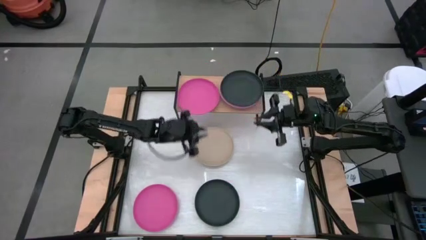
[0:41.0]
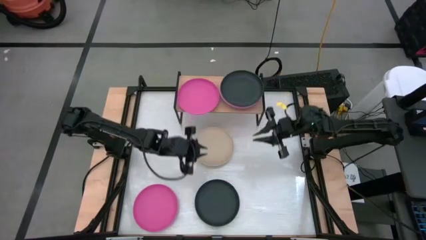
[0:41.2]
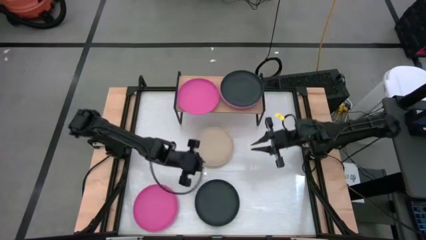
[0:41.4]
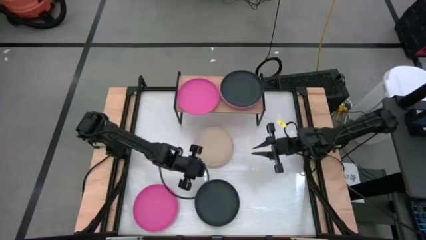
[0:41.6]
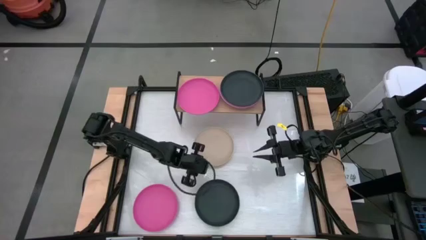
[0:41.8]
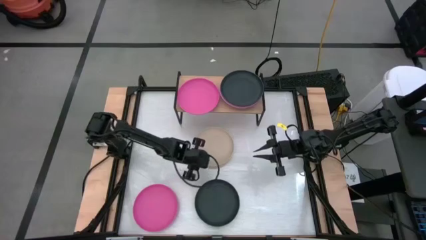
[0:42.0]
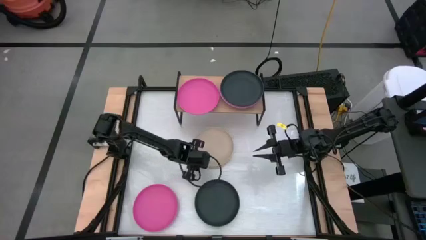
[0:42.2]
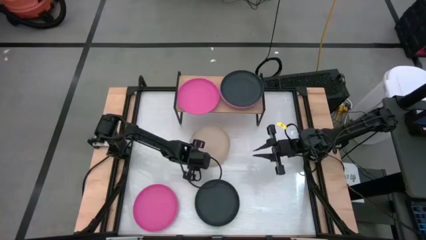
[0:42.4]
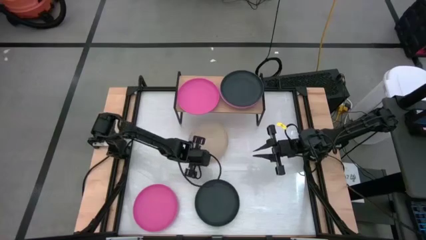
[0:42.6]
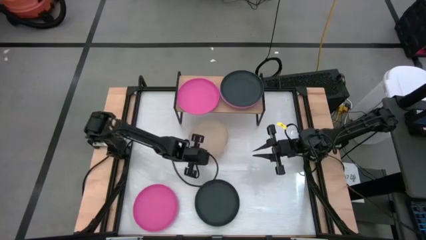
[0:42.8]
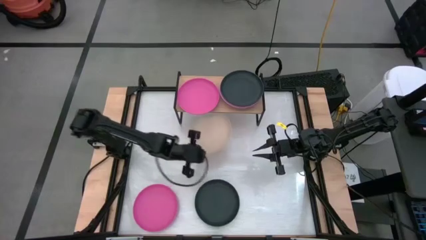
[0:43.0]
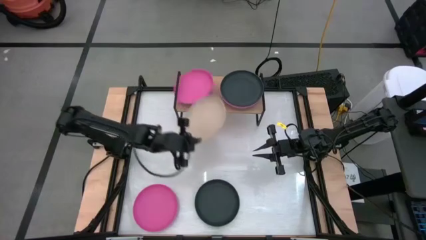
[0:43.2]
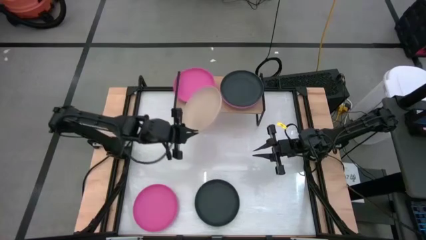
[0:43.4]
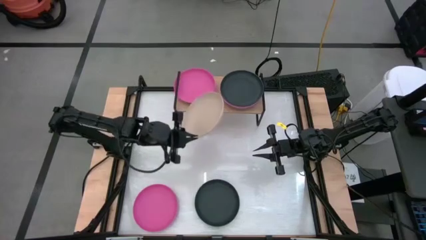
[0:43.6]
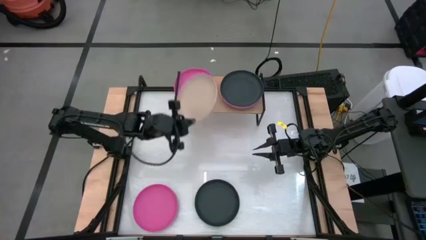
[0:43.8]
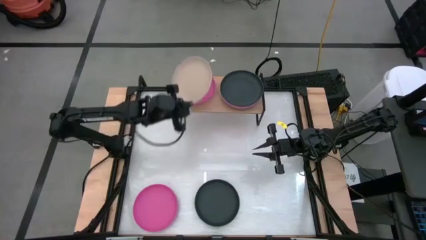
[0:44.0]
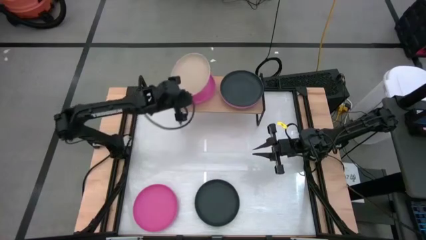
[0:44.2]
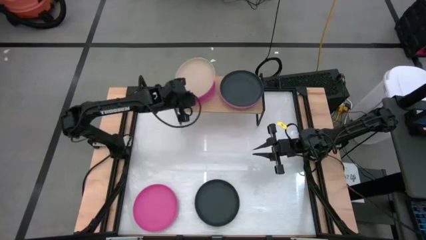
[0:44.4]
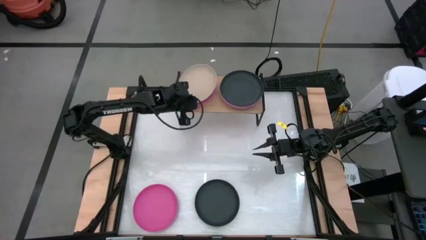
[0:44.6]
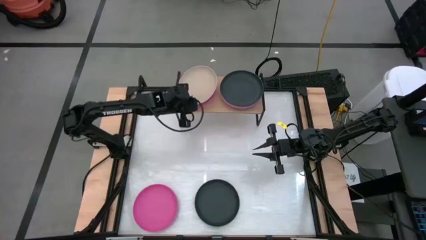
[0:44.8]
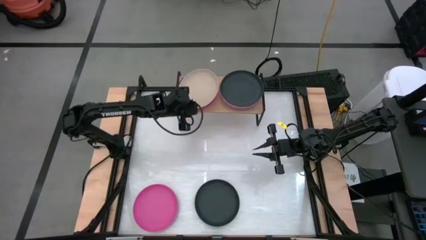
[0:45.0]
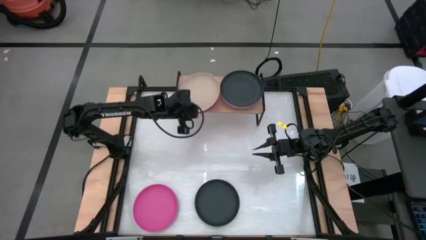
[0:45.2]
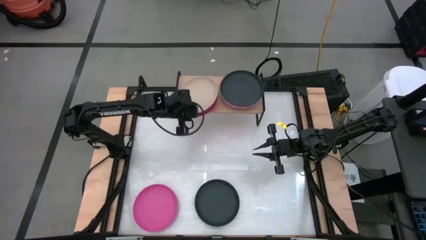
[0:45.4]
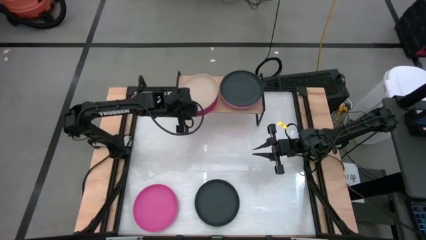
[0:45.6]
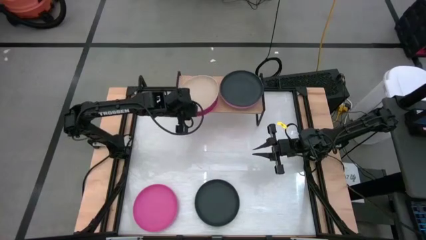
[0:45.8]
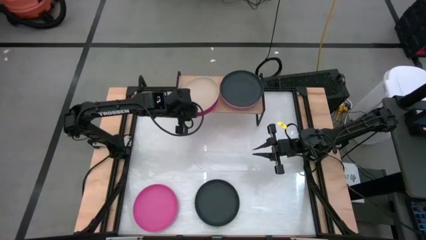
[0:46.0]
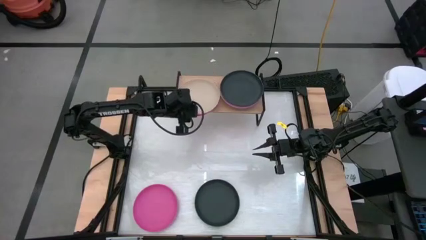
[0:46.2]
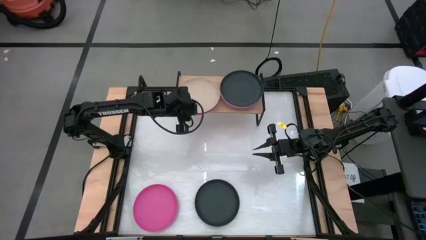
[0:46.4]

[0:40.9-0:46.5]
Task: Place and stack plates onto a shelf
Stack the brown plate on top of the pink plate on the shelf

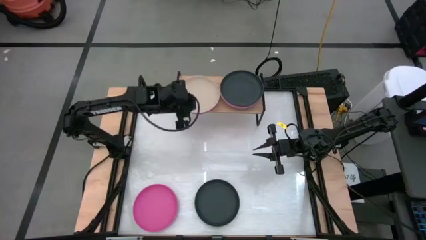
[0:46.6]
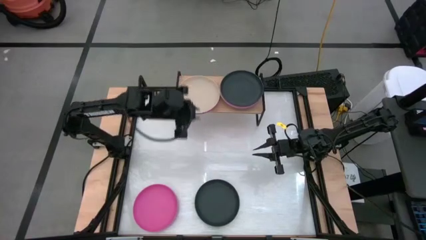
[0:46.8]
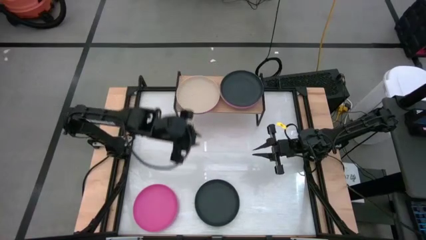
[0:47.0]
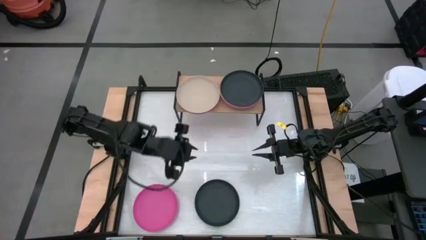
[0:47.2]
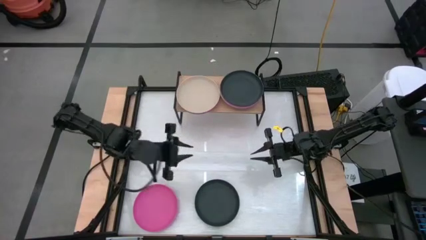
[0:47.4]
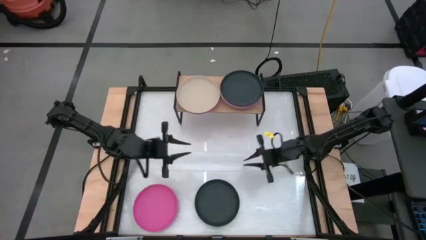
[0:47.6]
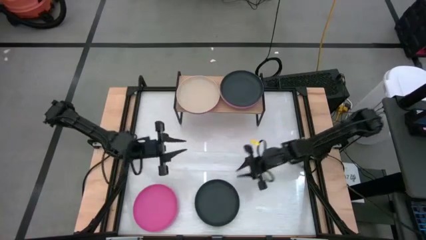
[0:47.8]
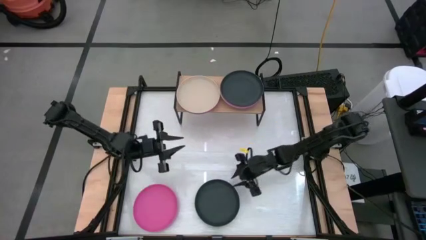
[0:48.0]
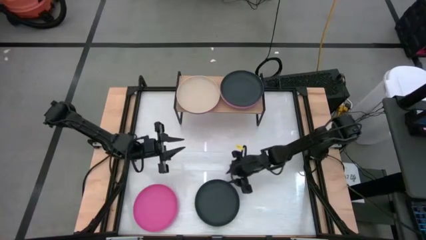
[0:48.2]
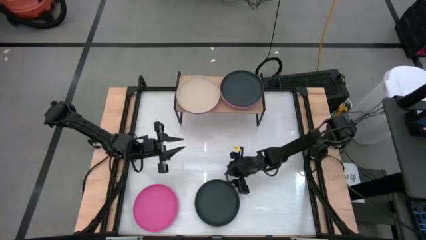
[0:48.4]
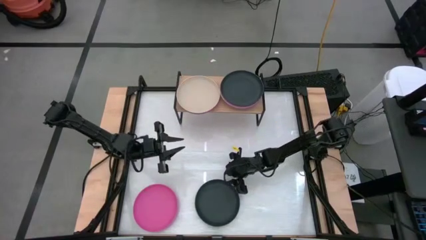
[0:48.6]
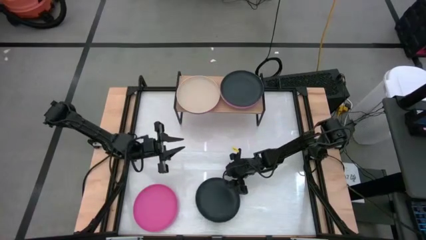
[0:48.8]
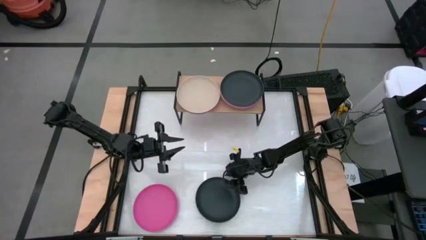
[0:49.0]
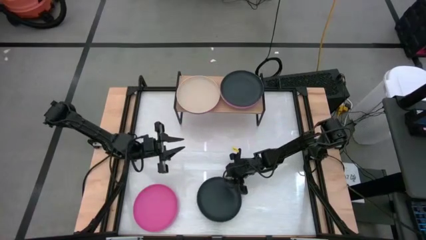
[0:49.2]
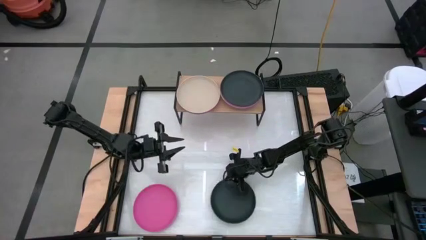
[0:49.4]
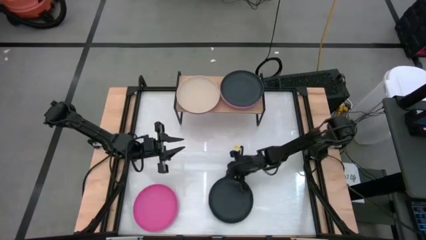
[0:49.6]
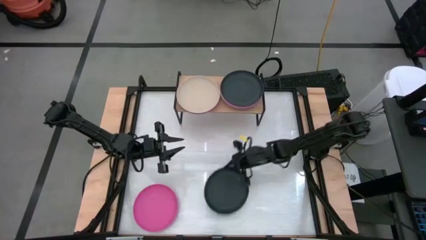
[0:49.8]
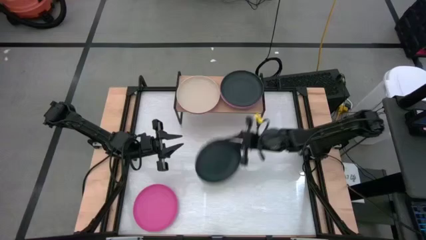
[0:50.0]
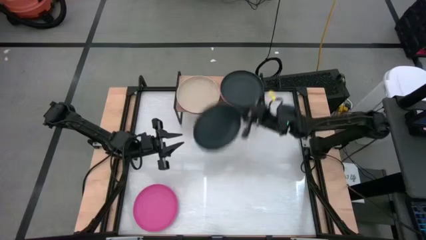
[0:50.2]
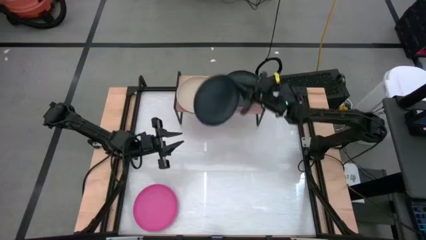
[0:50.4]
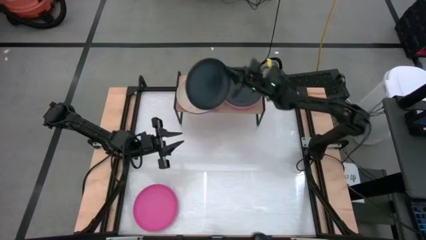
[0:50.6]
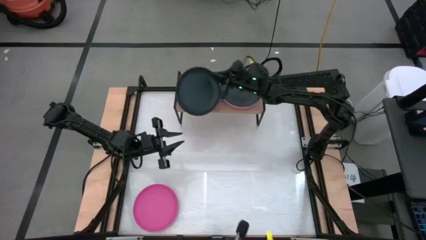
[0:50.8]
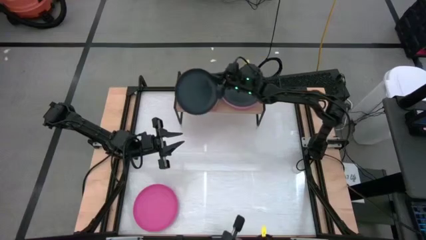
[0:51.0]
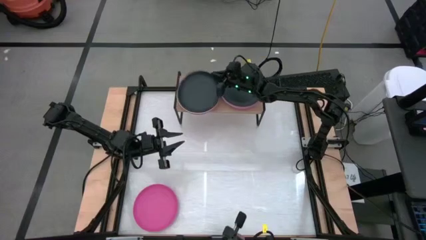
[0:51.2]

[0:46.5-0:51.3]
Stack the black plate on top of the brown plate on the shelf

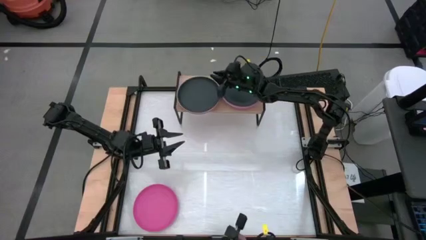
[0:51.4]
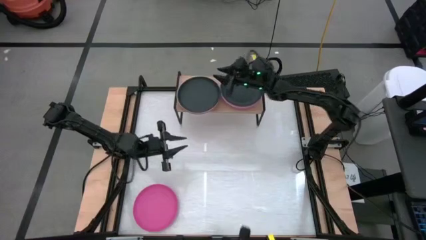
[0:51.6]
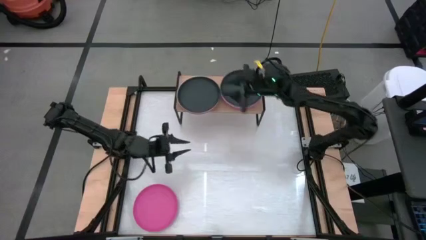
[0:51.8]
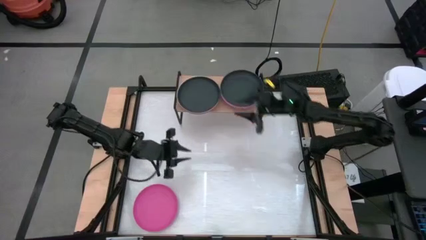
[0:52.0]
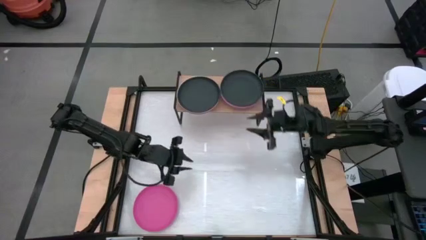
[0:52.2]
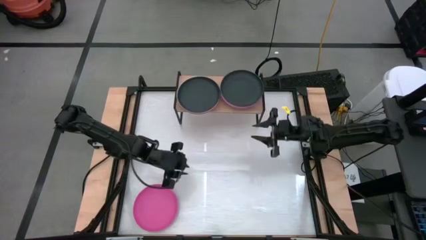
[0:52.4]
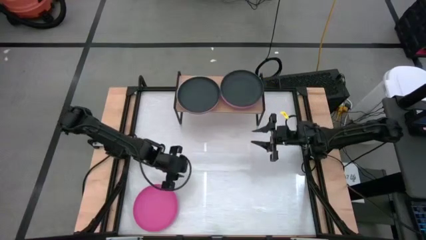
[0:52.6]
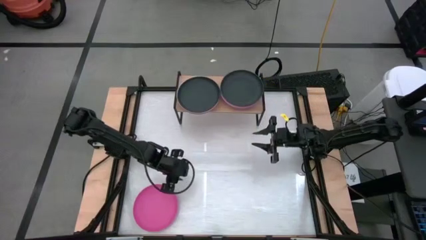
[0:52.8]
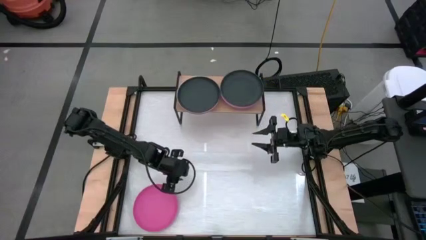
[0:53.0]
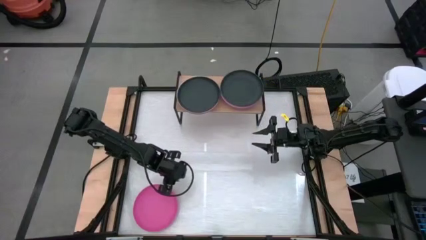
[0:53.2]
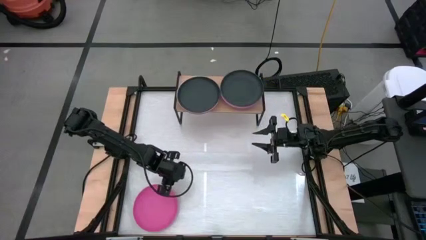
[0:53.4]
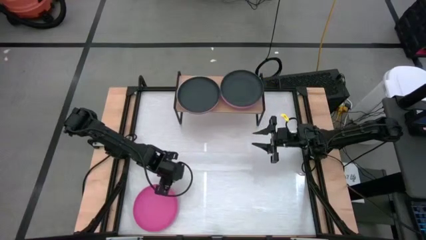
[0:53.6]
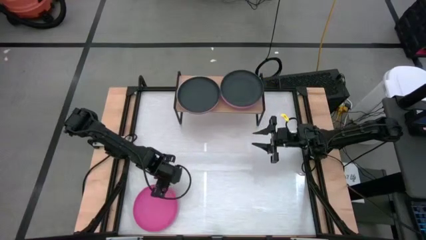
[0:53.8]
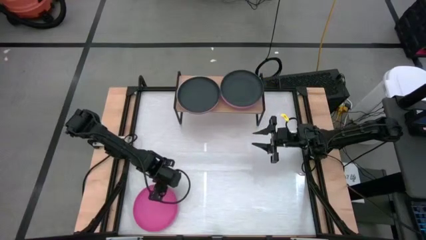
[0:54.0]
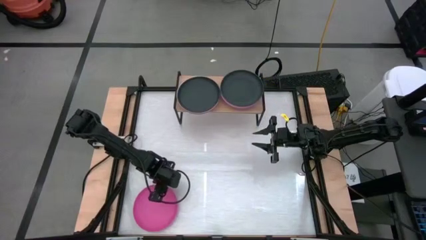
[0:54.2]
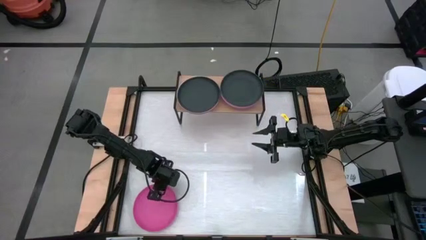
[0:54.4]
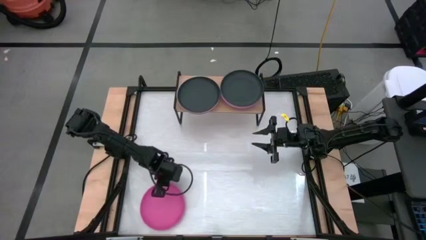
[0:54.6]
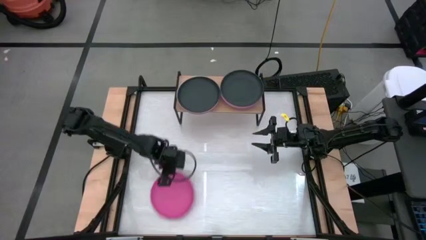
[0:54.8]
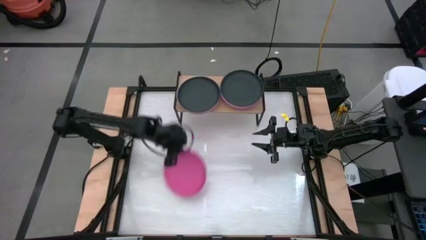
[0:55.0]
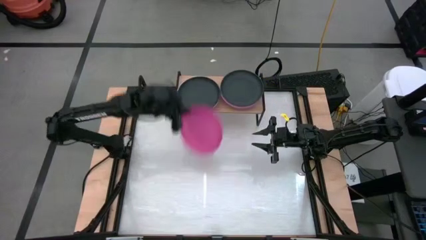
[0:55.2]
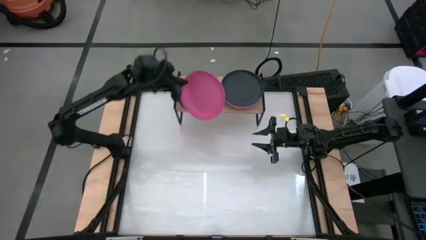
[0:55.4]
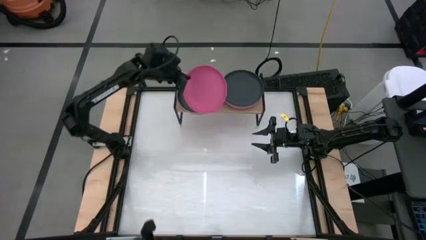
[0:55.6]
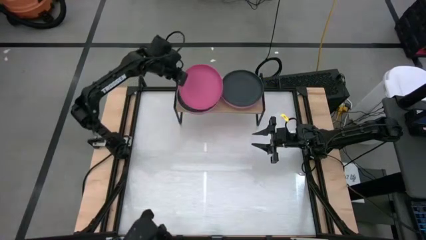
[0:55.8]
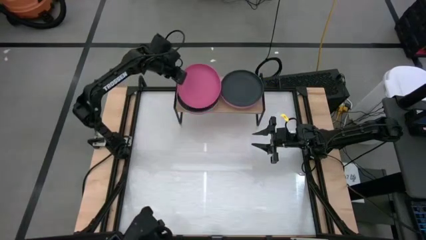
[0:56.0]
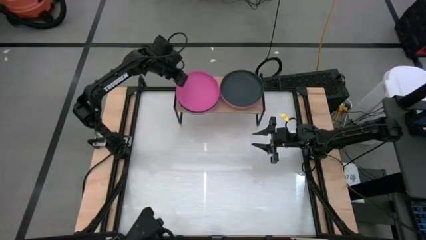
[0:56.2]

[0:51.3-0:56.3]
Stack the pink plate on top of the black plate on the shelf

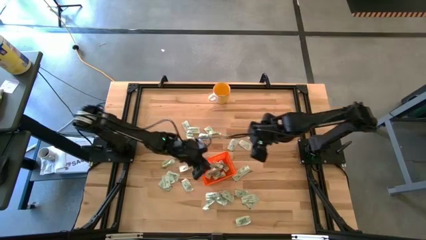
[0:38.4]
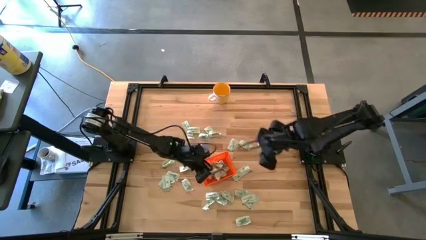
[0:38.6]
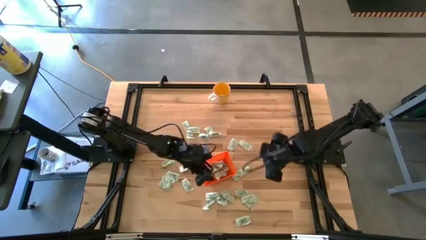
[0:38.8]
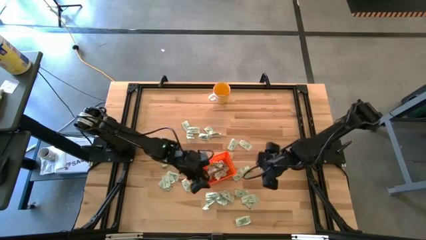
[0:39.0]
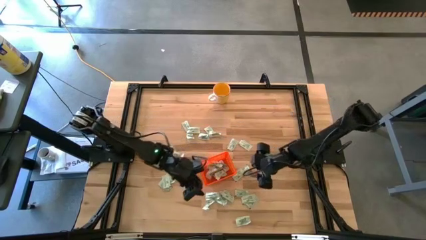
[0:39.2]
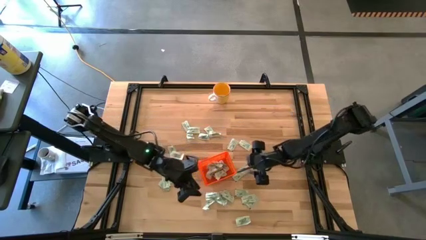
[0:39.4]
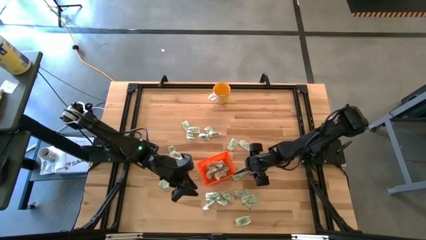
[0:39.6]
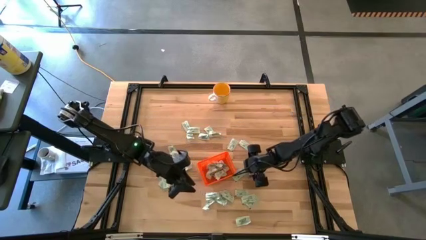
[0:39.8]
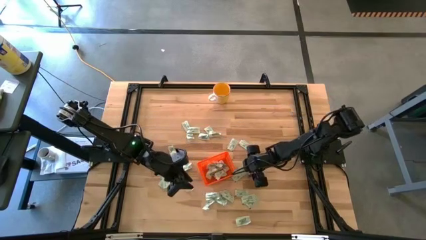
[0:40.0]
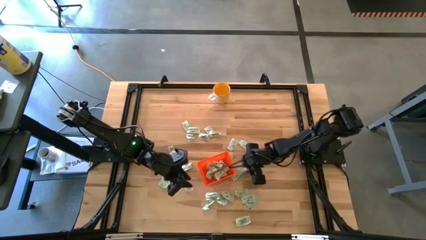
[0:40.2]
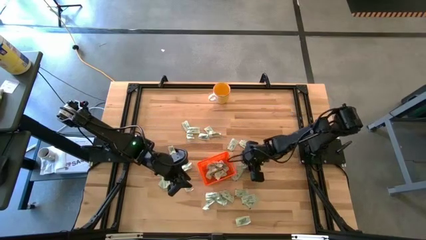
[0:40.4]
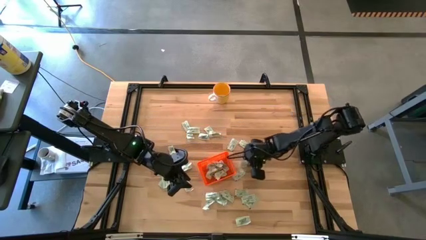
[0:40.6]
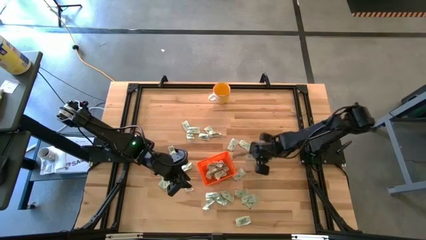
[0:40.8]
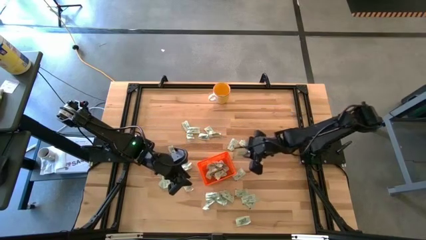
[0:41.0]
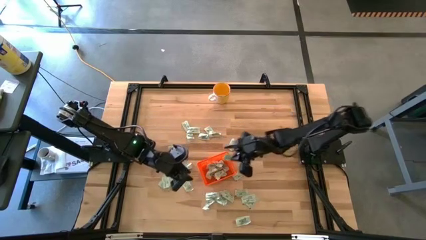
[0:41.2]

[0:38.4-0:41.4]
Task: Pick and place Stevia / Truvia into bins
Put the stevia packet into the bin
